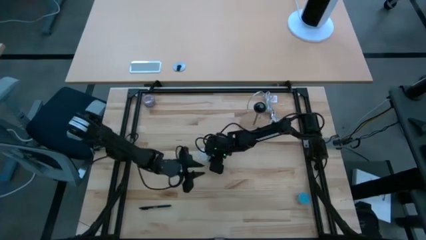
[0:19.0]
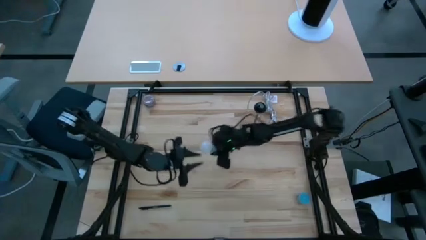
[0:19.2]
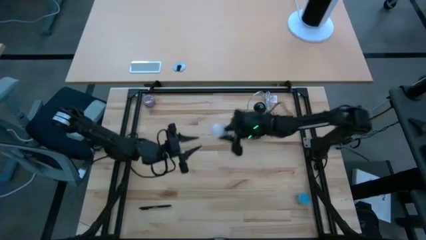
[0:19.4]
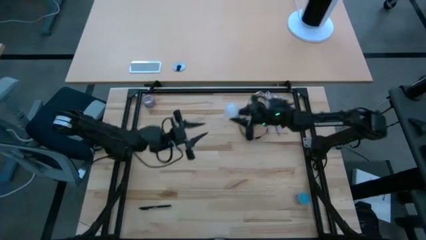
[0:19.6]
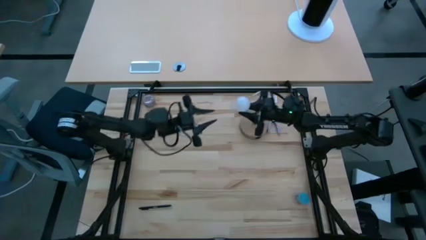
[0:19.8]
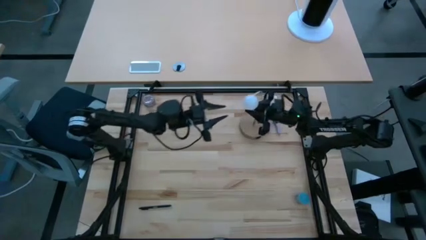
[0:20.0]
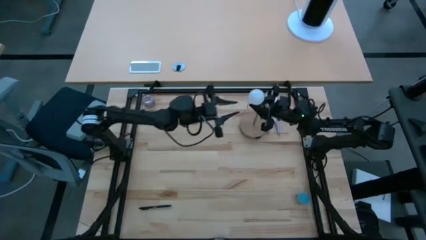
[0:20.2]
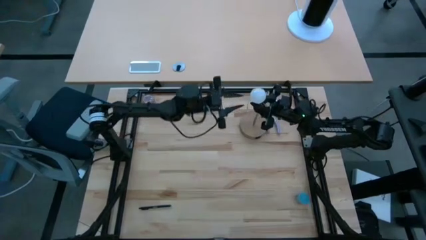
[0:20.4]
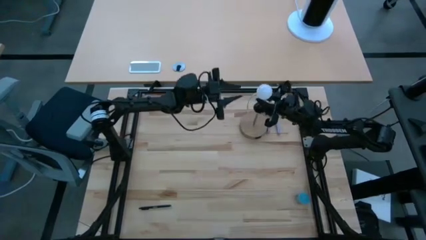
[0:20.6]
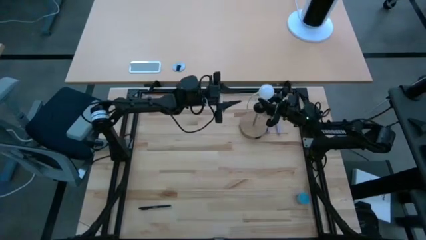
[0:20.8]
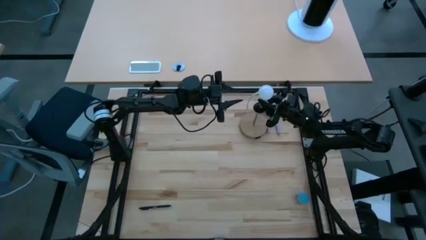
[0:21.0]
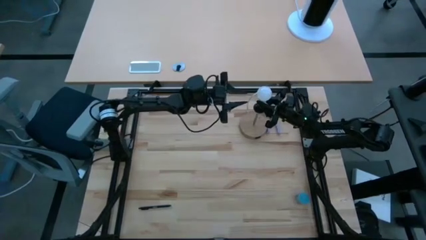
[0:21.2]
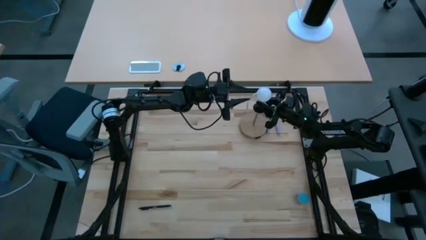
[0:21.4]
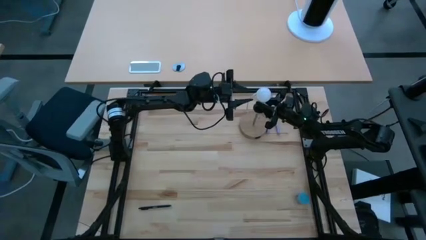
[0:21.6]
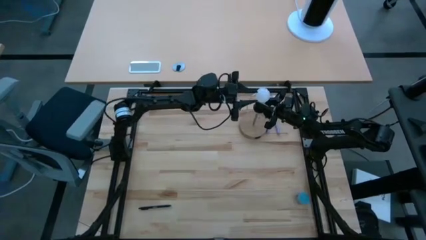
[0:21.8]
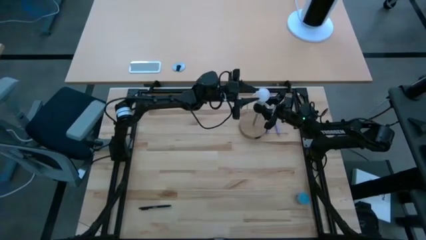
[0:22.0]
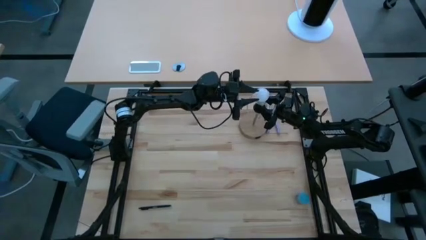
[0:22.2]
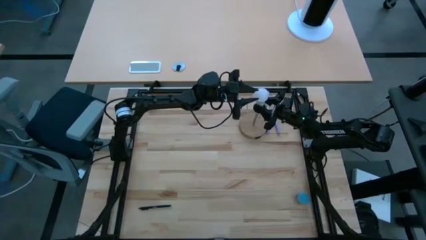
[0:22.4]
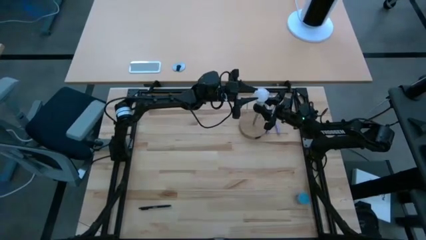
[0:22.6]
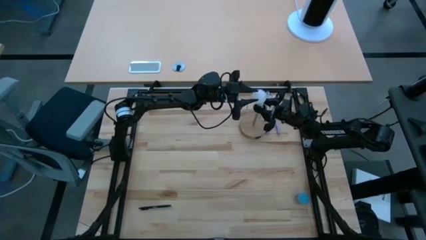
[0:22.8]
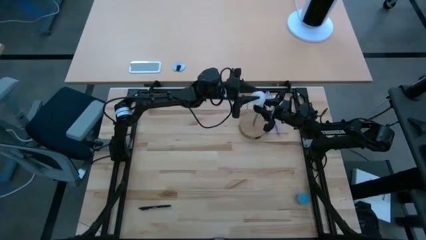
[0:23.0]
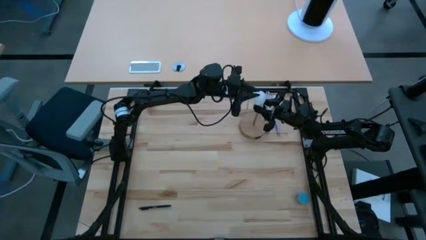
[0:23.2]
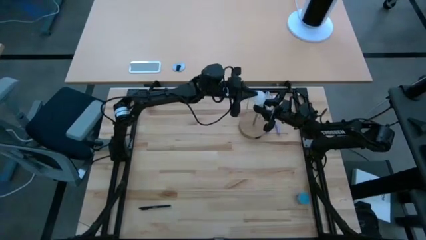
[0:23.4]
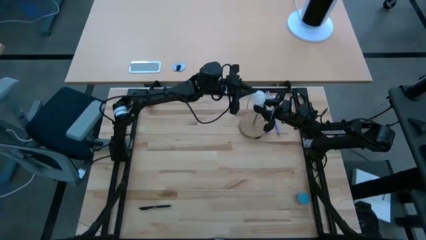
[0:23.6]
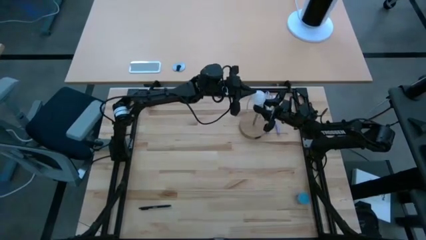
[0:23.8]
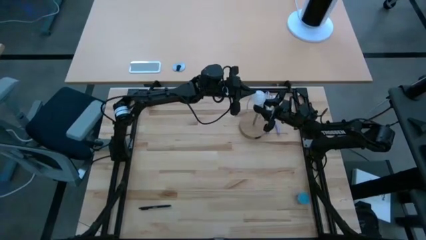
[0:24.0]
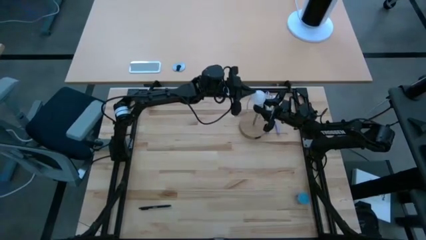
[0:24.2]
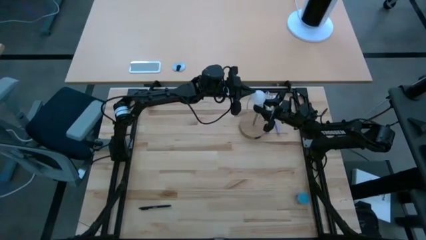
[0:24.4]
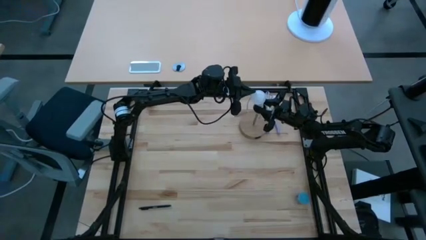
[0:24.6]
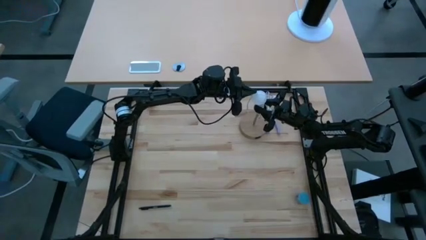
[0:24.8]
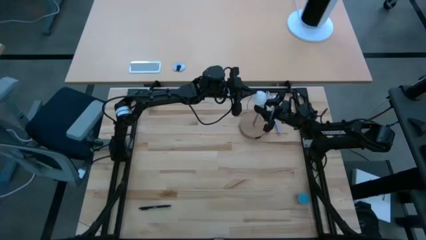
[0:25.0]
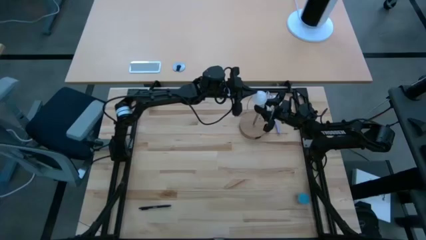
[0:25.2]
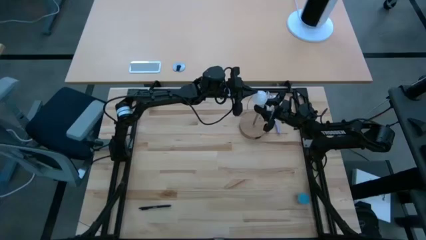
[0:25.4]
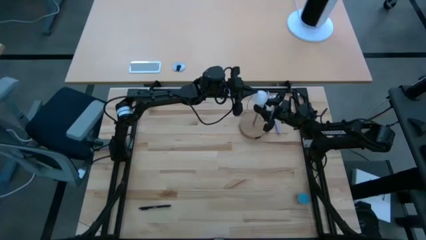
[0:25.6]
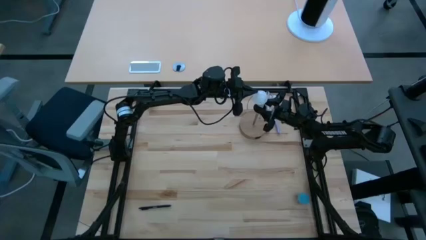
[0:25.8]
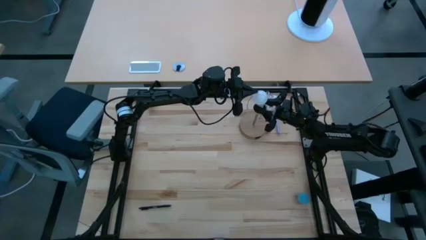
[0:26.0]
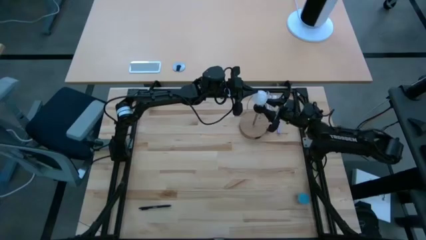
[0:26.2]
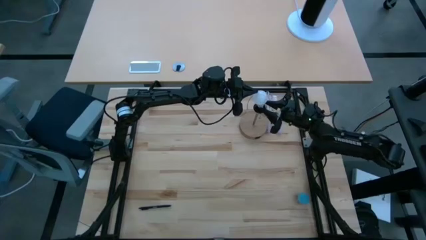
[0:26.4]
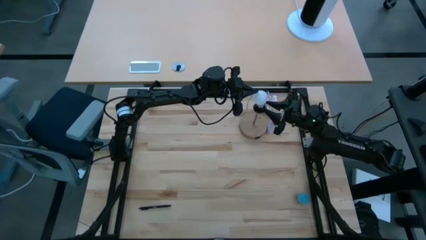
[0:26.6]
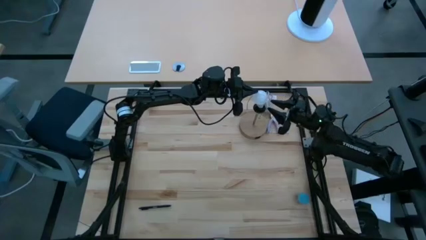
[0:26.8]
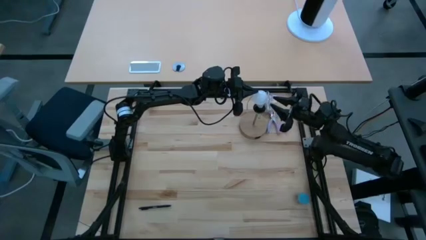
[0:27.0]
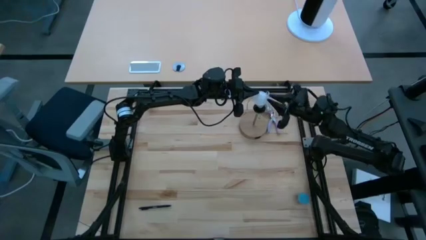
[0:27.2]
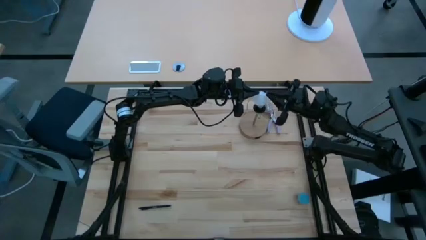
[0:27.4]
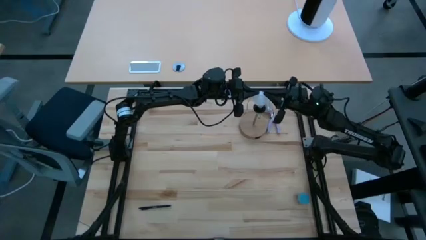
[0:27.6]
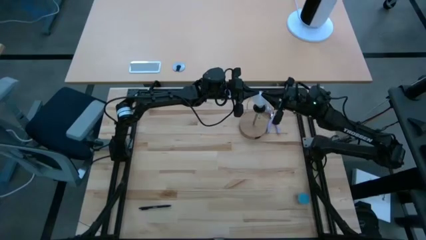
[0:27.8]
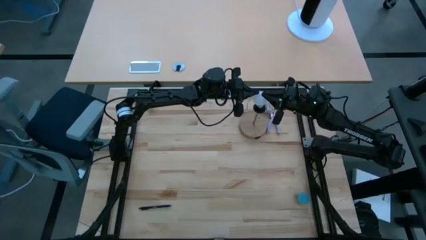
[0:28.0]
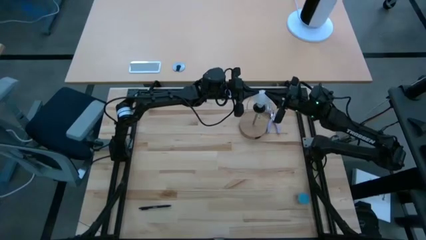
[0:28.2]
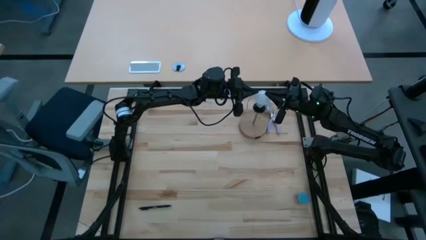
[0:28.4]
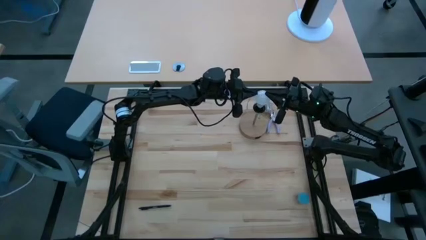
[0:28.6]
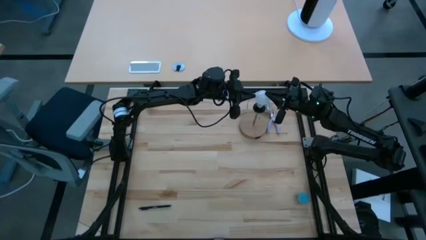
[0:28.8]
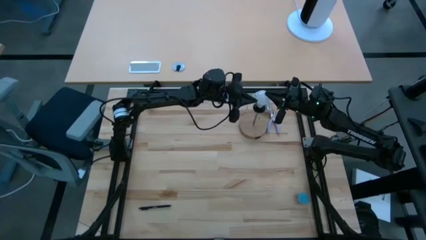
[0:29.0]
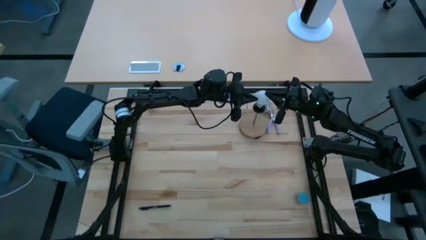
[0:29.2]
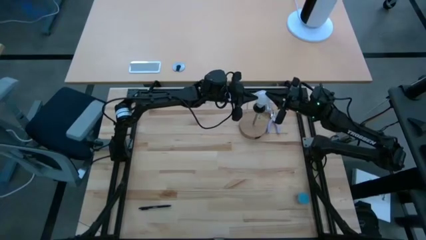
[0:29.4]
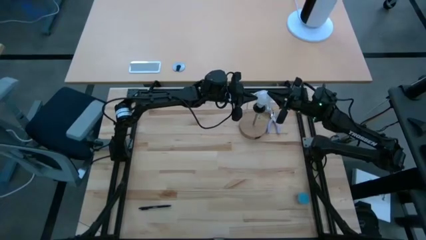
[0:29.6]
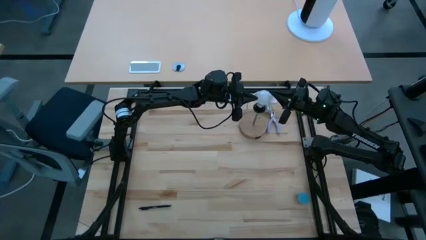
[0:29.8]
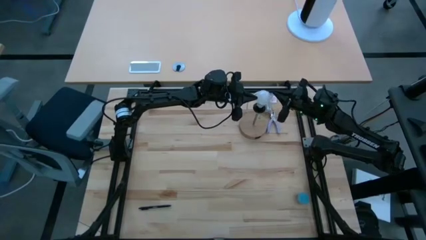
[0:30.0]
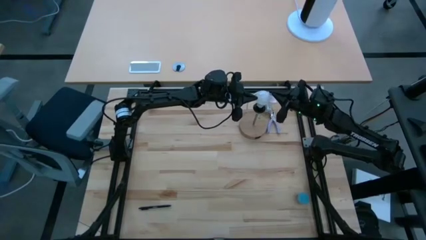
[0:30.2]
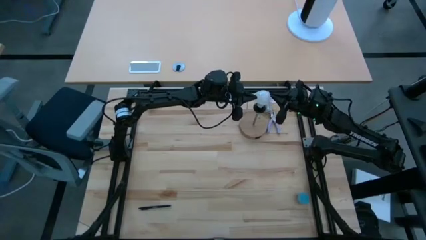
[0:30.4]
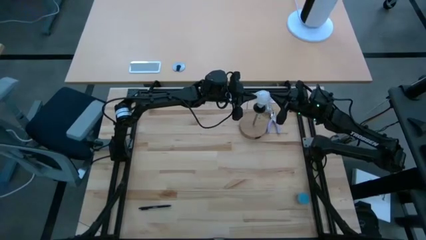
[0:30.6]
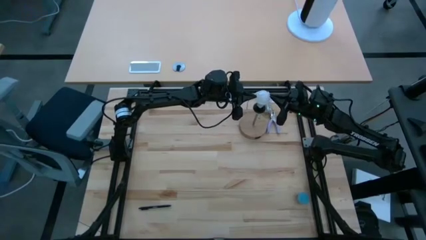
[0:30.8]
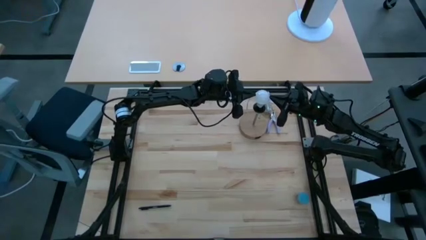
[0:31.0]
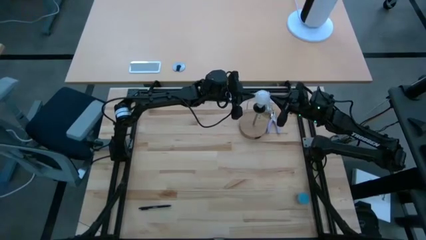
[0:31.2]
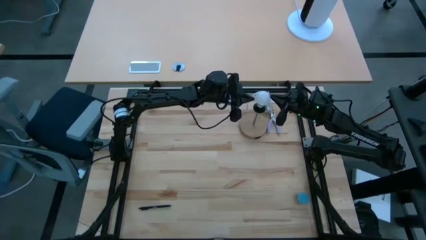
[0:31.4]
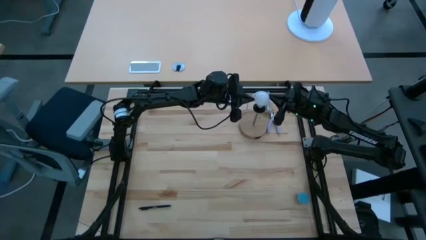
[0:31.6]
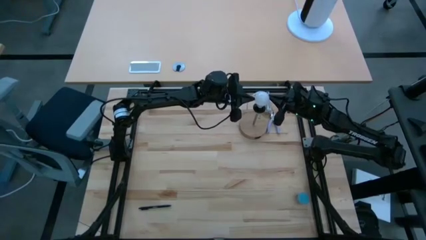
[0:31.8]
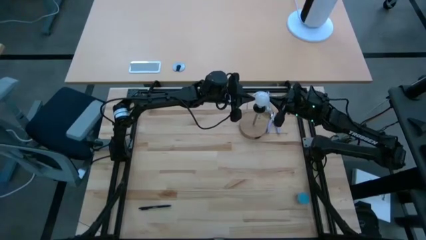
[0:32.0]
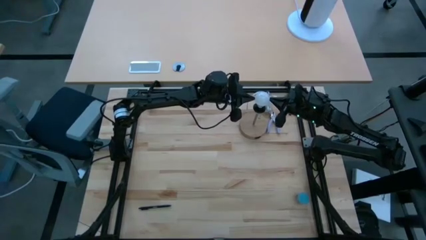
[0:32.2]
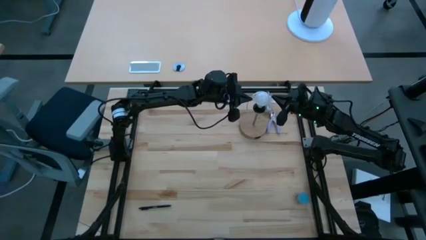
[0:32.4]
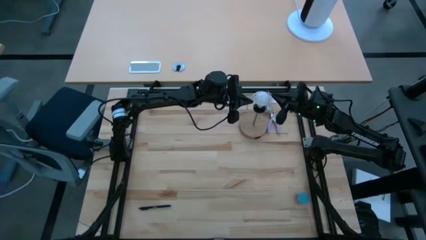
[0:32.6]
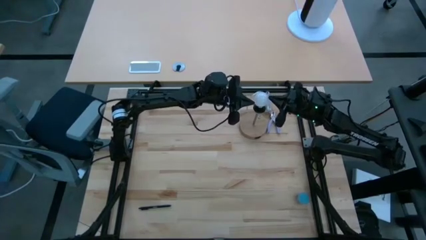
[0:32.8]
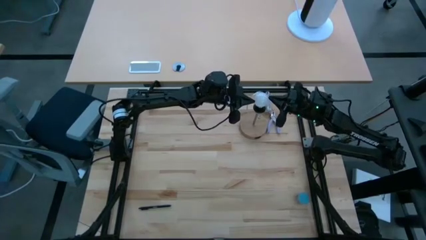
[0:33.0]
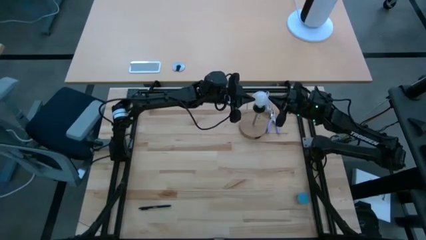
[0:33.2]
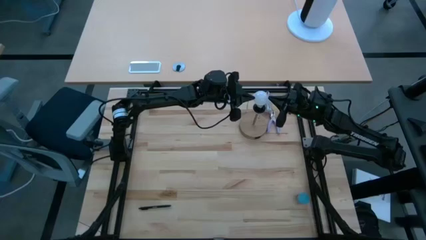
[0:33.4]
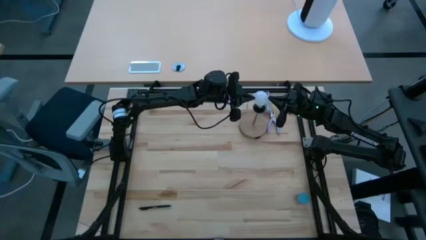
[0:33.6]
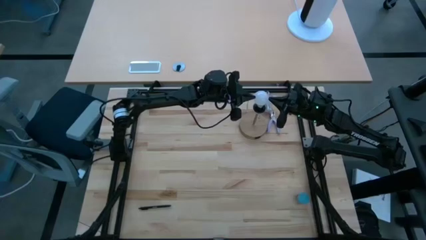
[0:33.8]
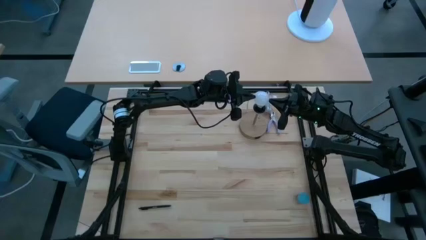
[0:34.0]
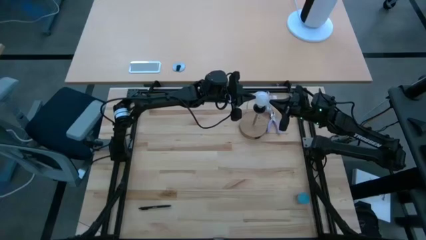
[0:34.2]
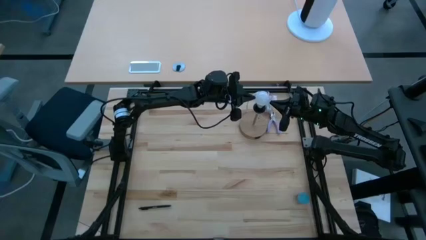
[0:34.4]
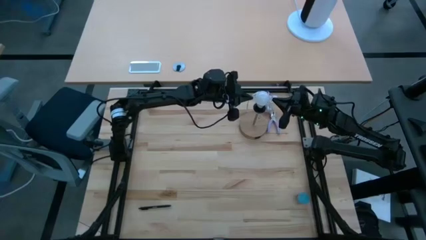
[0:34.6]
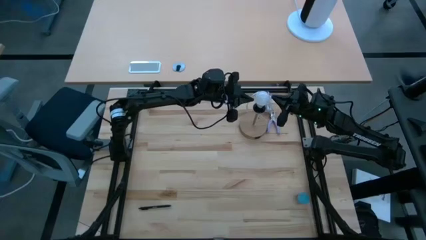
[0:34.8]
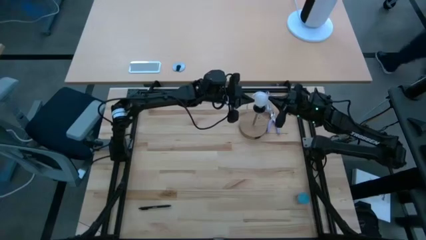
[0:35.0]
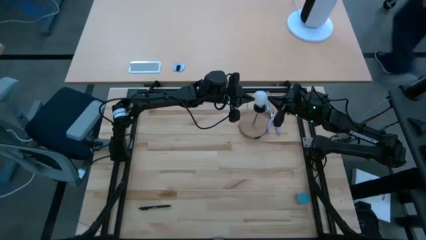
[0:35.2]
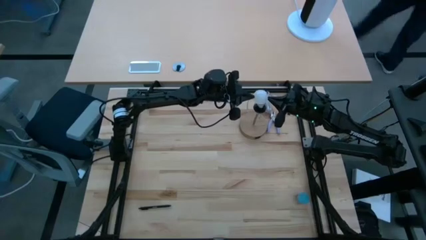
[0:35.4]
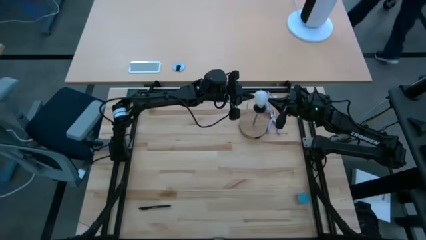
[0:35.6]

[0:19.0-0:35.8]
Task: Screw lightbulb
Insert the lightbulb on the lamp

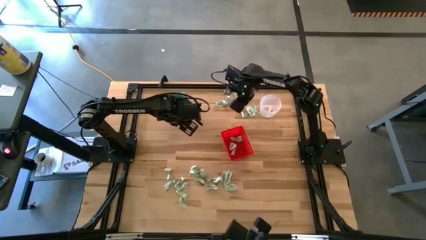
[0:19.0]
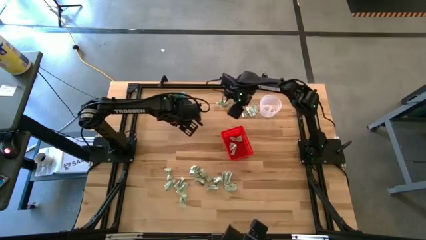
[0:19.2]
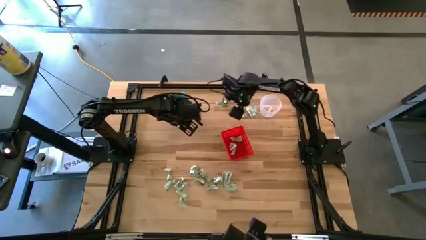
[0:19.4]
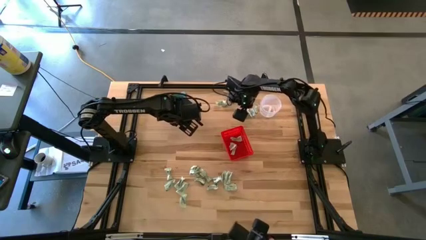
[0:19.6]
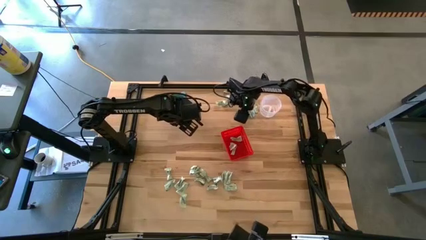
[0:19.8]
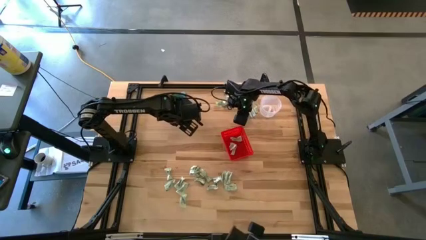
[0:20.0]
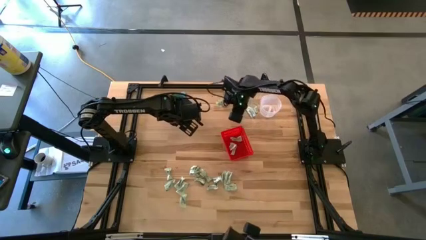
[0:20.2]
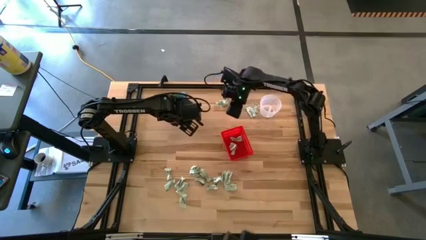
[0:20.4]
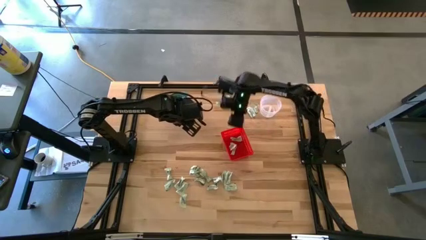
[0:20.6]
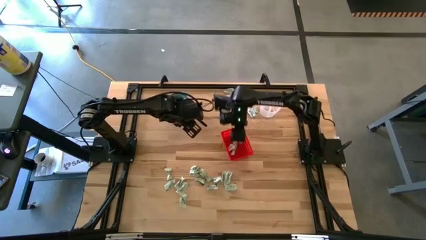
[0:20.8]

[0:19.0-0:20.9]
Task: Pick and place items into bin
Put the stevia packet into the orange bin
